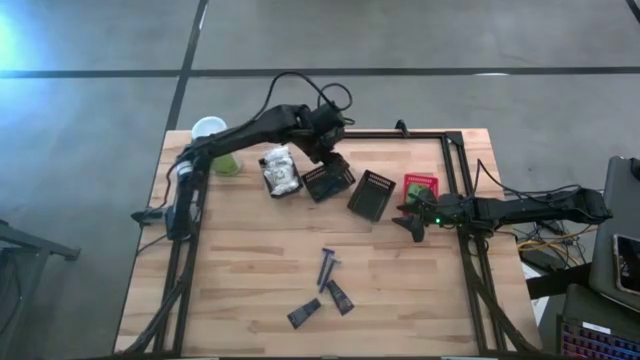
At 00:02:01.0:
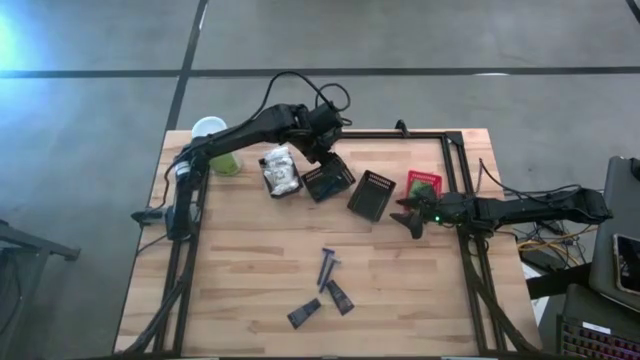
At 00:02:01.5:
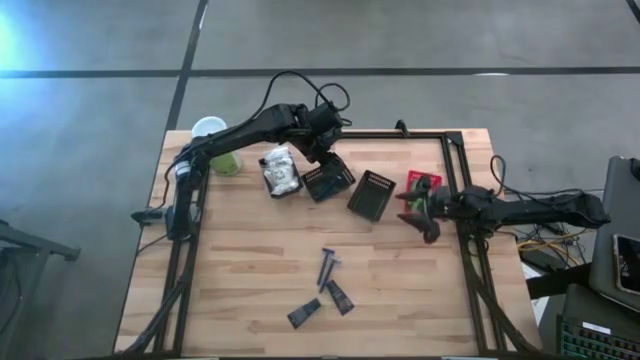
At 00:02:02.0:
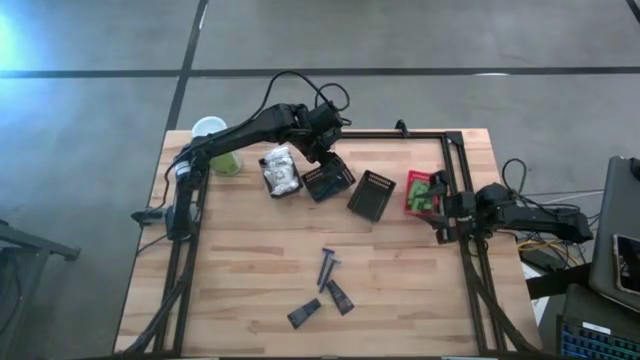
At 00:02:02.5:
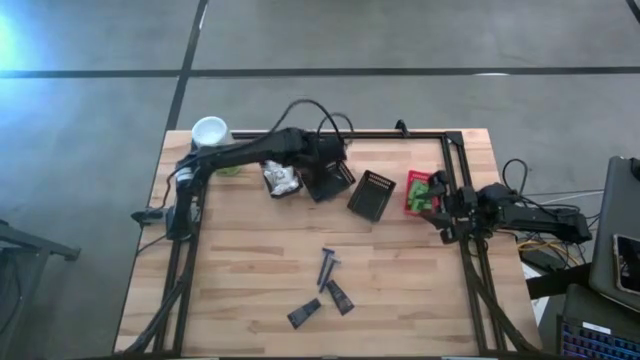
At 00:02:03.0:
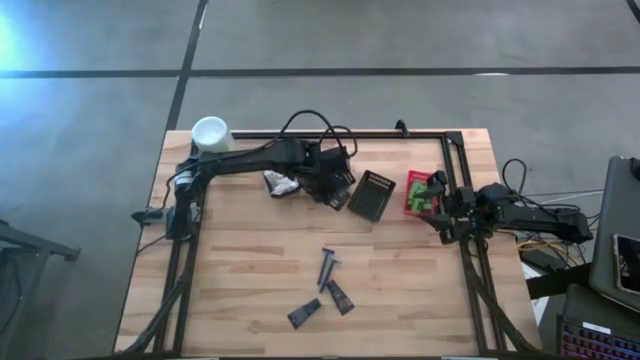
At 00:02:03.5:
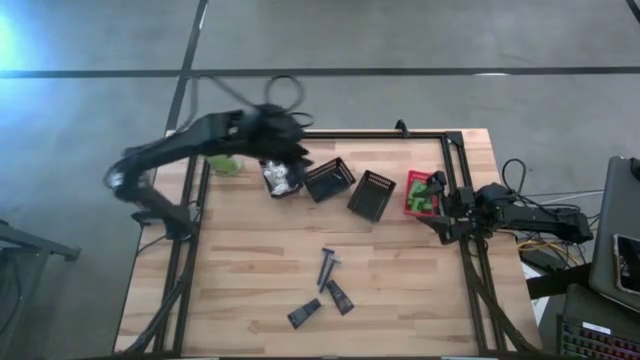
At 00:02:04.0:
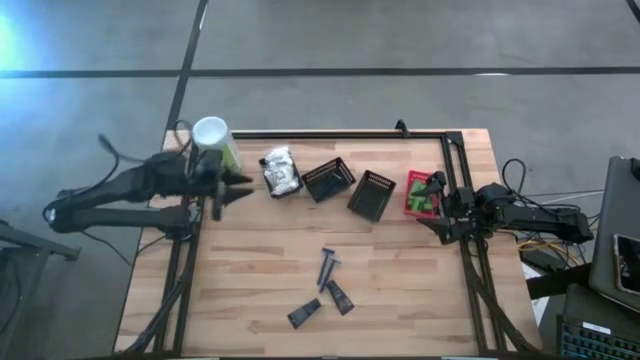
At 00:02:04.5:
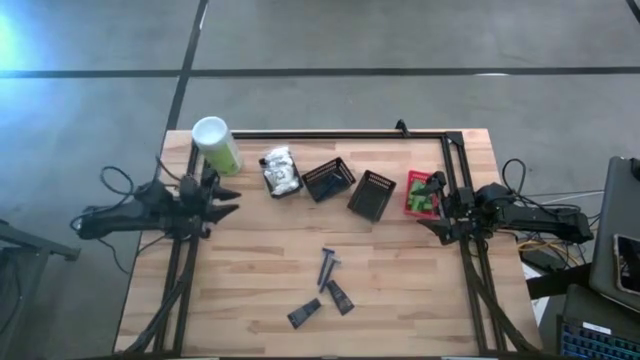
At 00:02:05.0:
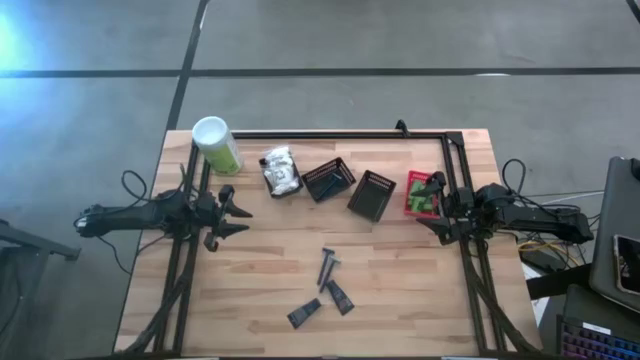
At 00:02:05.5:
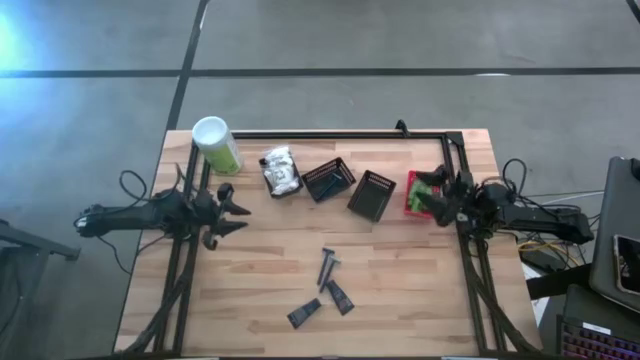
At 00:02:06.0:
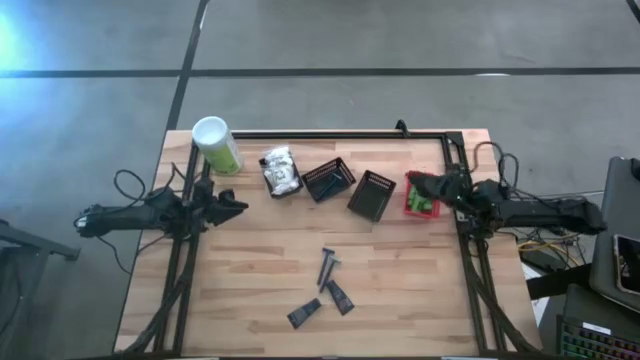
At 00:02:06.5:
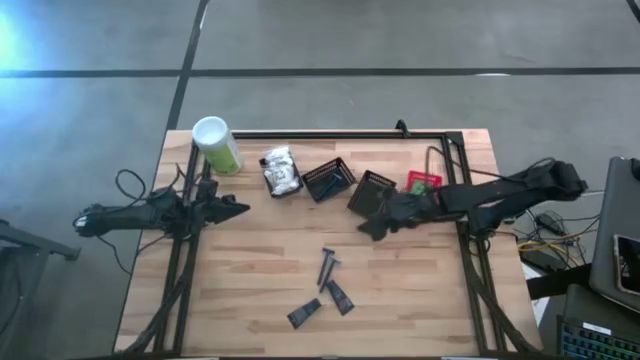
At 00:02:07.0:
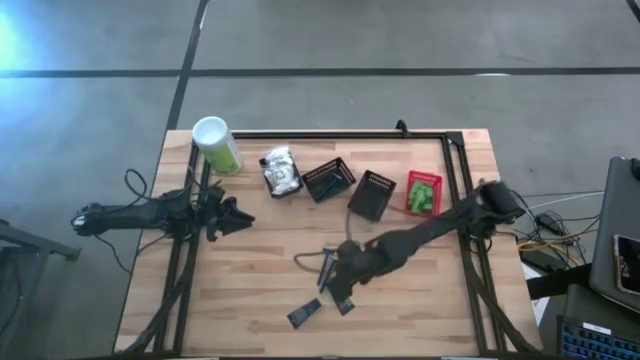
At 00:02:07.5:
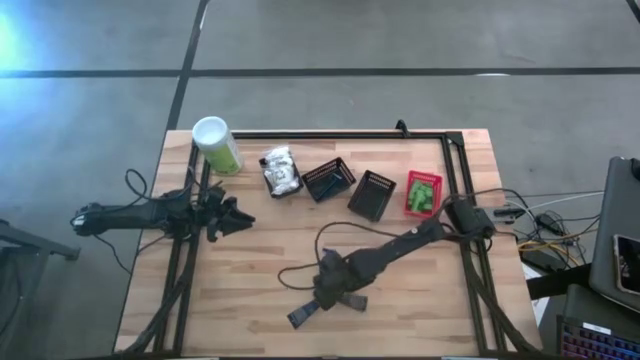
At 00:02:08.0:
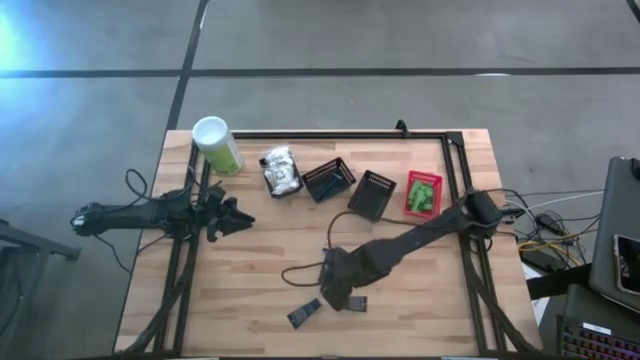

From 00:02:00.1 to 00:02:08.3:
Task: Pick & Place Travel size toiletries
Put the right shave cream into the right black bin

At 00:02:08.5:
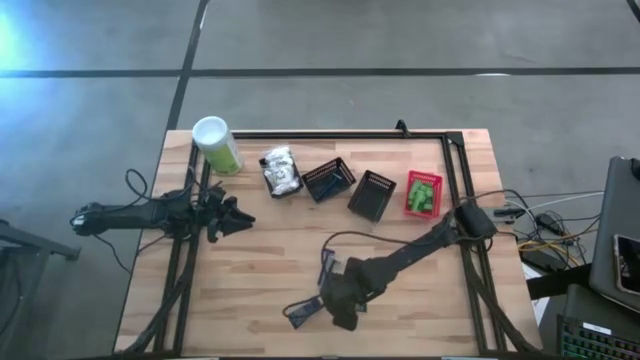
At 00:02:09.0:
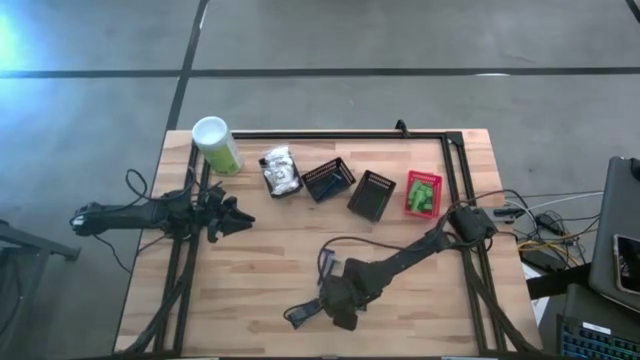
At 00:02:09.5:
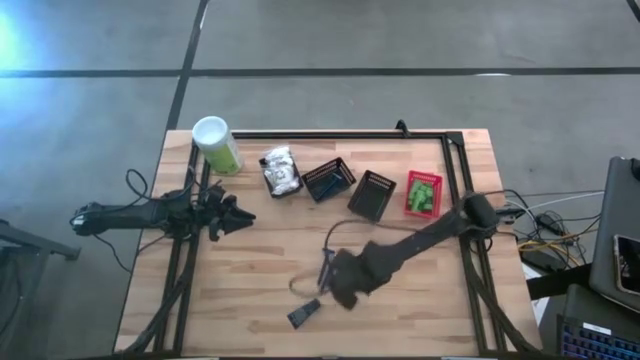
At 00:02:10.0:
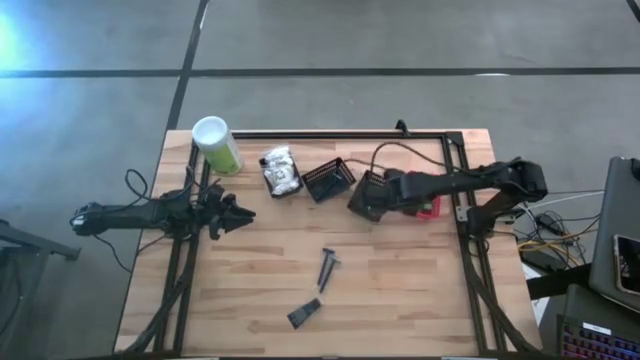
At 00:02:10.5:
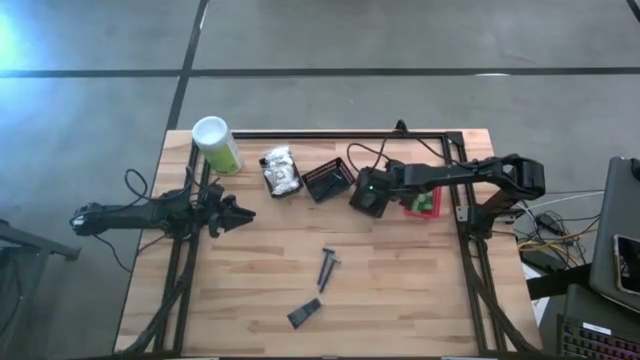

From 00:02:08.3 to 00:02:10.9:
Put the right shave cream into the right black bin

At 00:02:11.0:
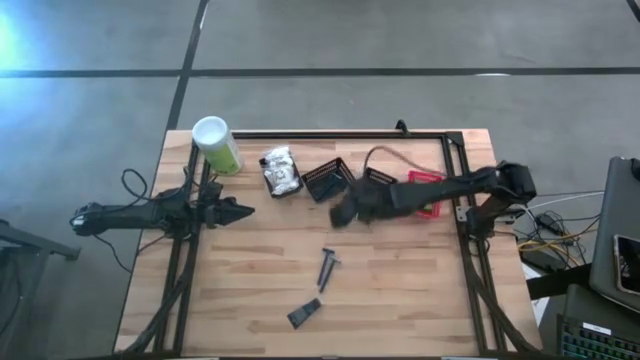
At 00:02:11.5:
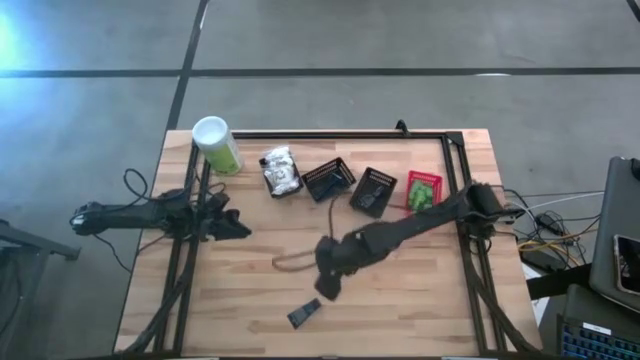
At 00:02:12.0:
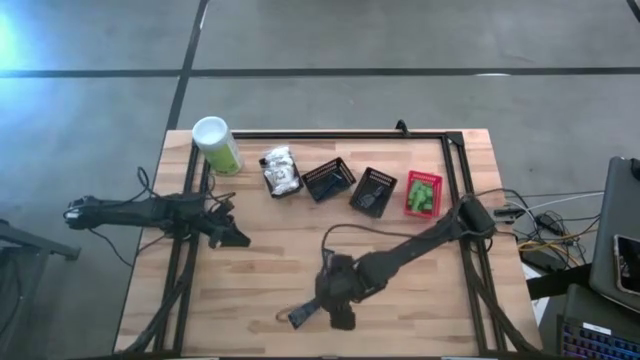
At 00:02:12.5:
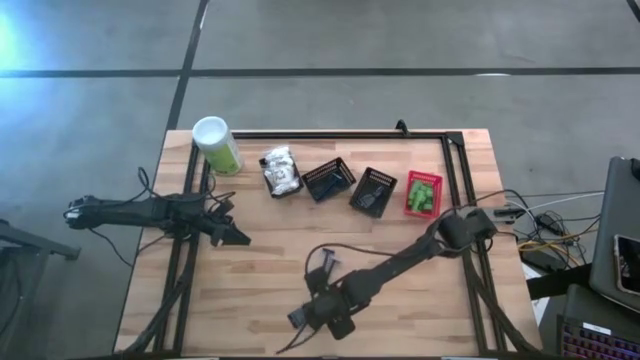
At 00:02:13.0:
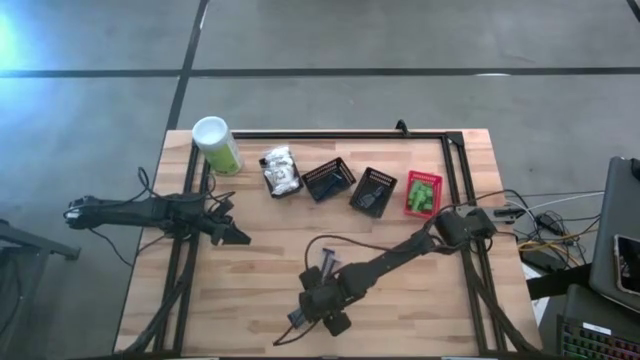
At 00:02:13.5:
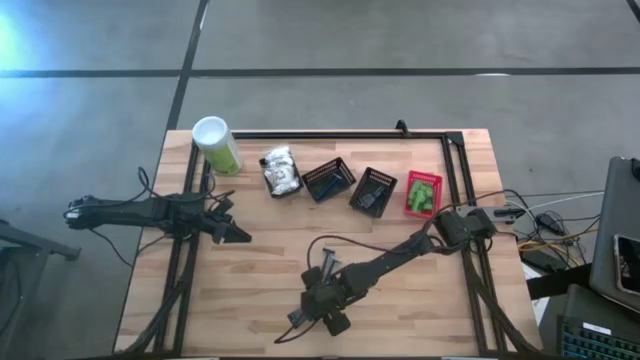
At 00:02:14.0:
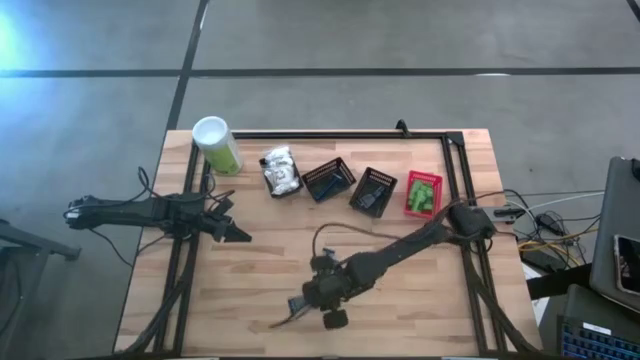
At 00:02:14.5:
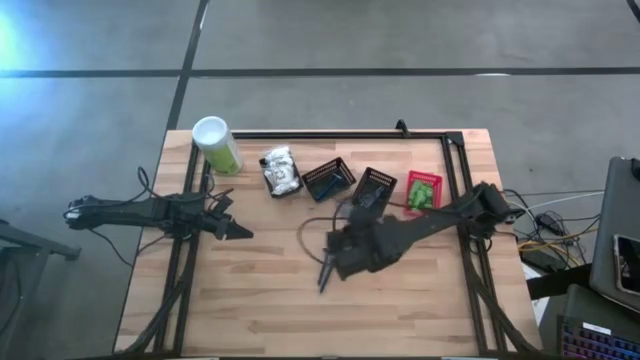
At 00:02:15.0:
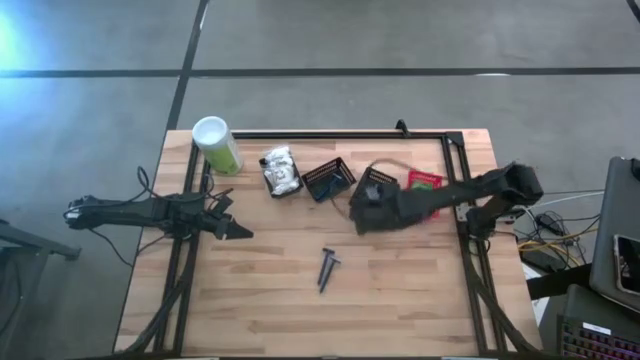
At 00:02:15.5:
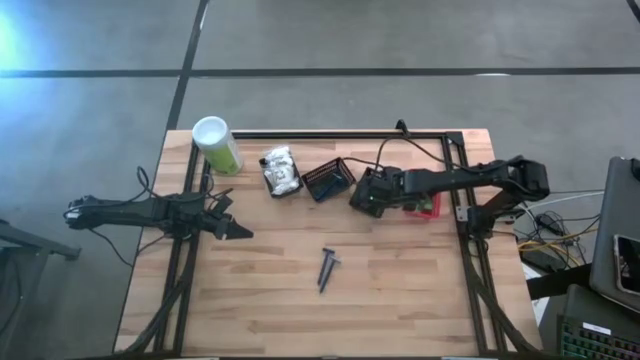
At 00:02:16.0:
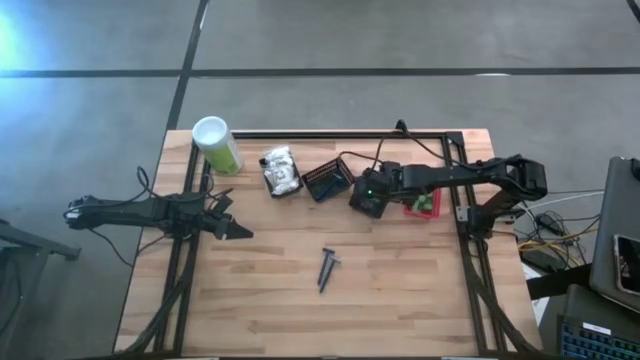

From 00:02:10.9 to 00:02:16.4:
Put the shave cream into the right black bin

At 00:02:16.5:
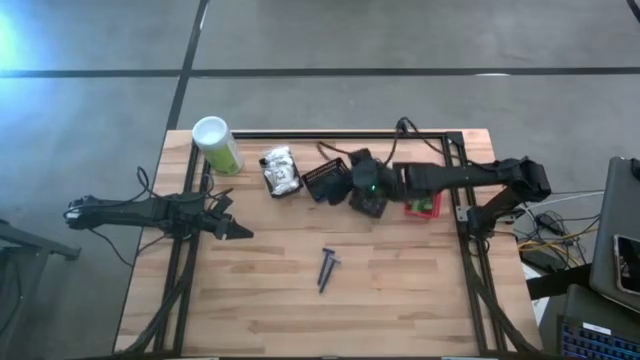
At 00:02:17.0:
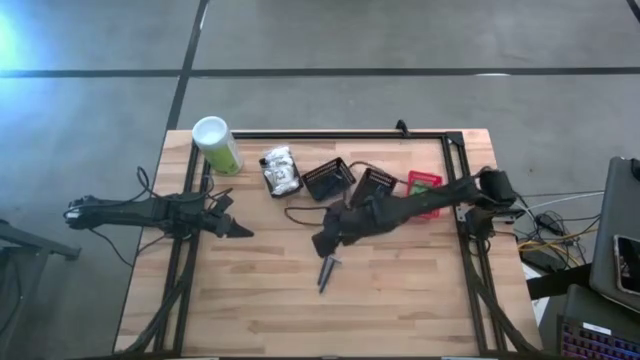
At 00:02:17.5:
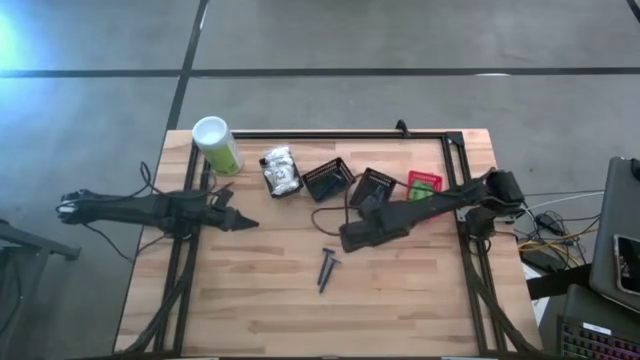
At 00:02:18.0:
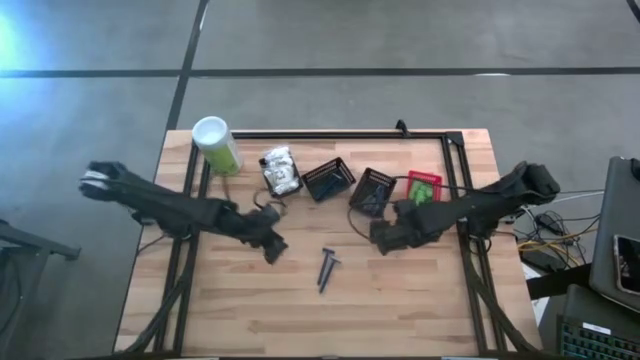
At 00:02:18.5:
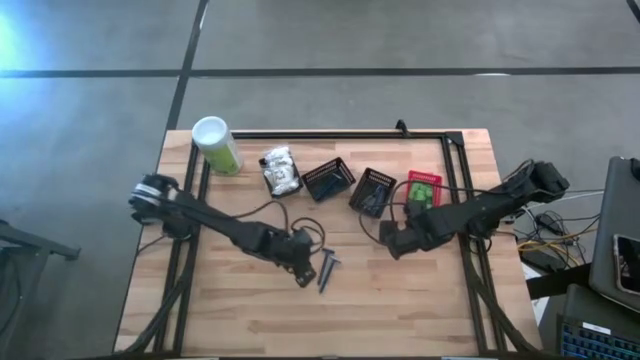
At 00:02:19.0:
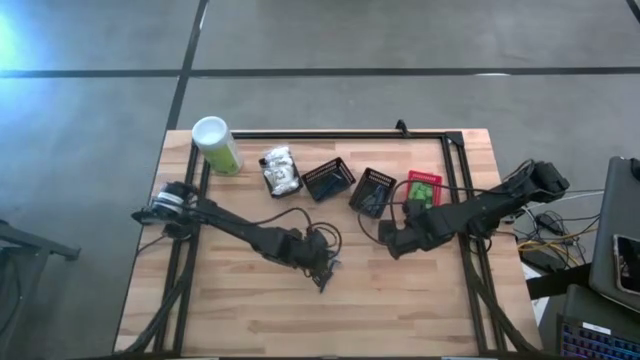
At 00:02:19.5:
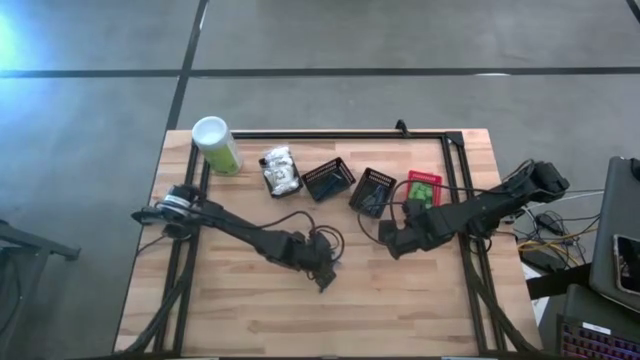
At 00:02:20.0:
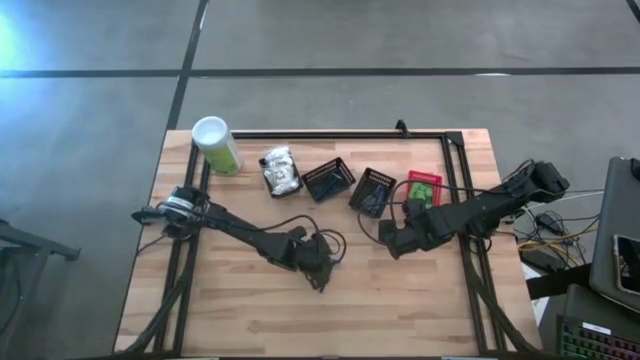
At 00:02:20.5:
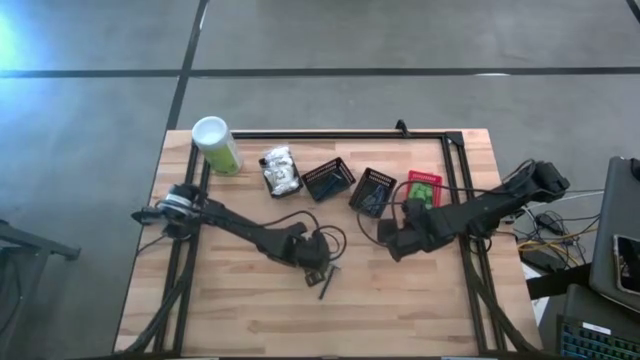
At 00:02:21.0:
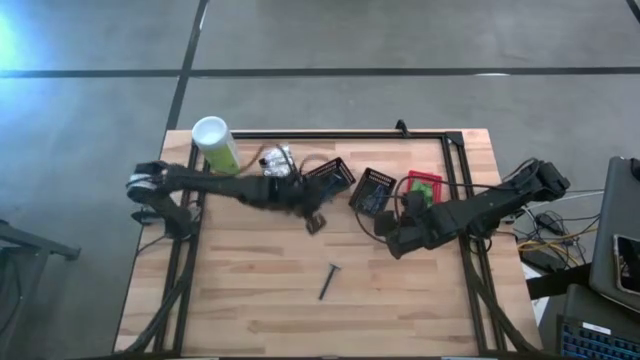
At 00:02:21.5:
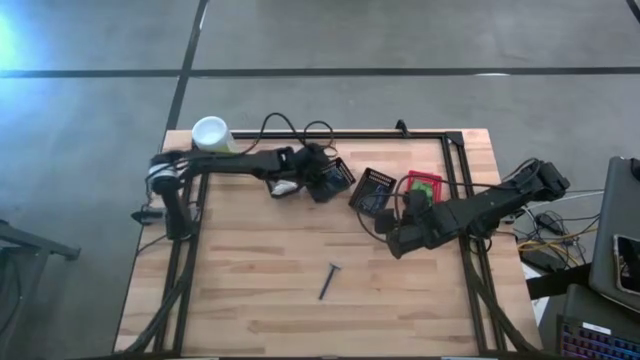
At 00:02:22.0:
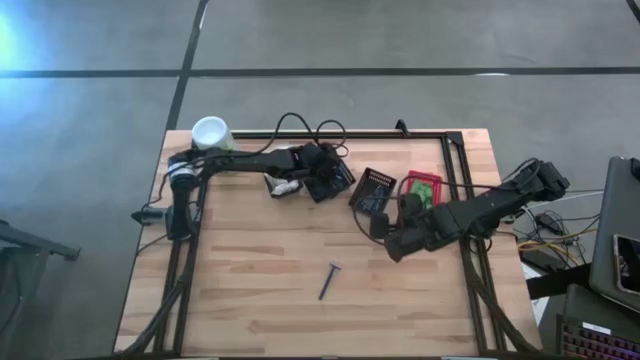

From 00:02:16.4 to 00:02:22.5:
Put the left razor into the middle black bin
